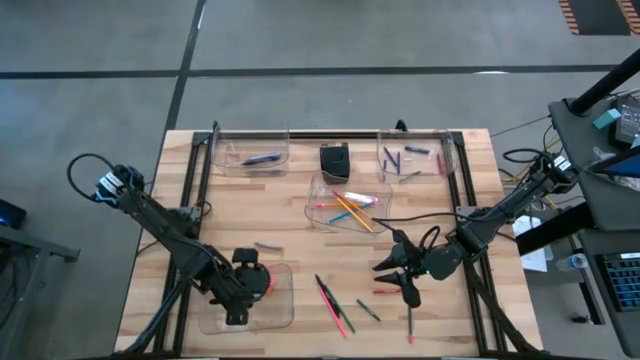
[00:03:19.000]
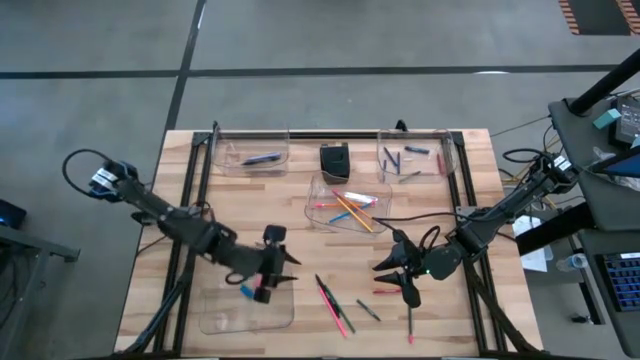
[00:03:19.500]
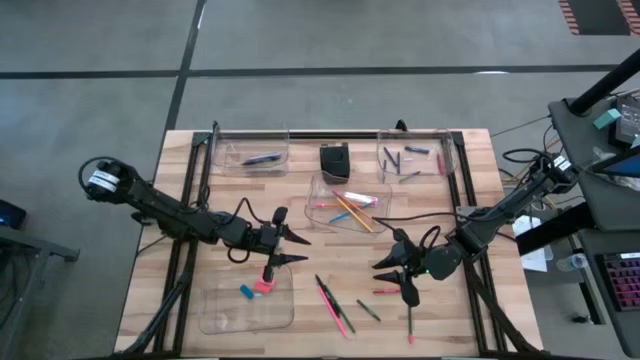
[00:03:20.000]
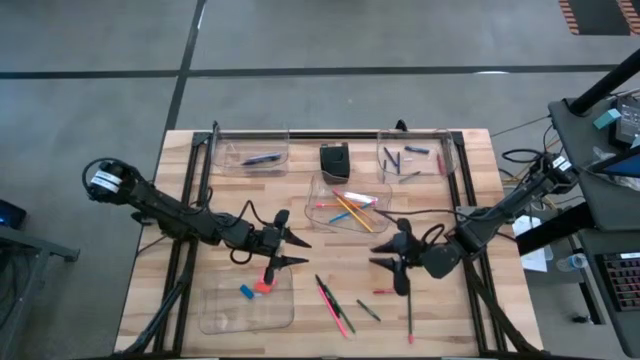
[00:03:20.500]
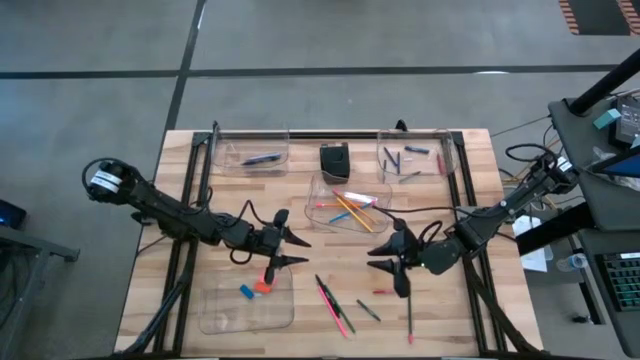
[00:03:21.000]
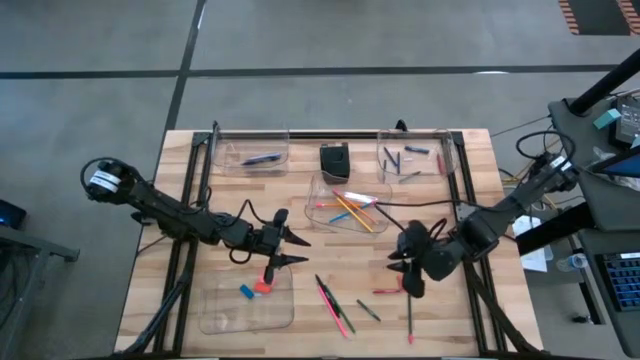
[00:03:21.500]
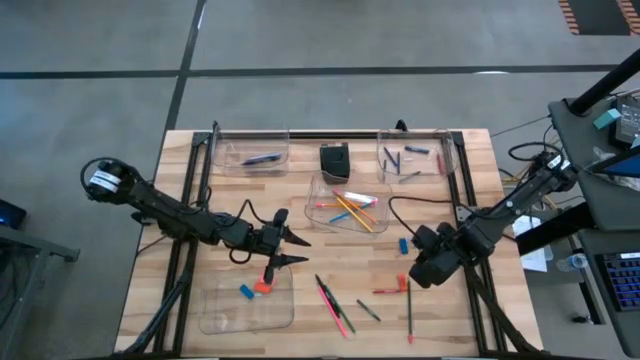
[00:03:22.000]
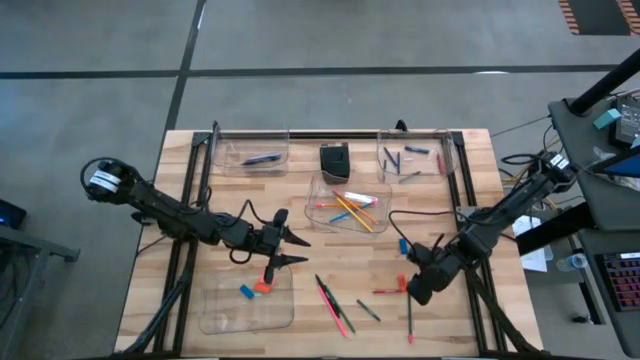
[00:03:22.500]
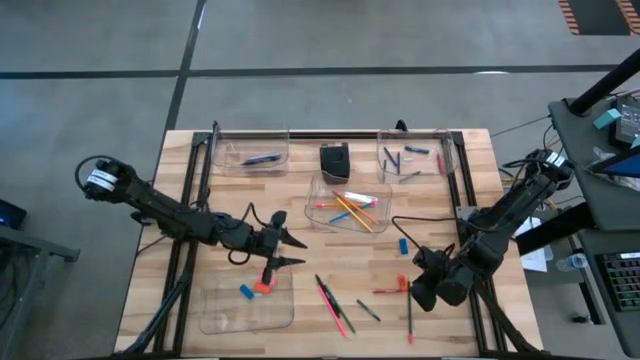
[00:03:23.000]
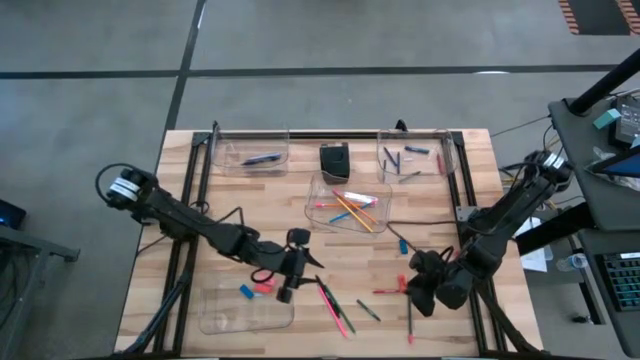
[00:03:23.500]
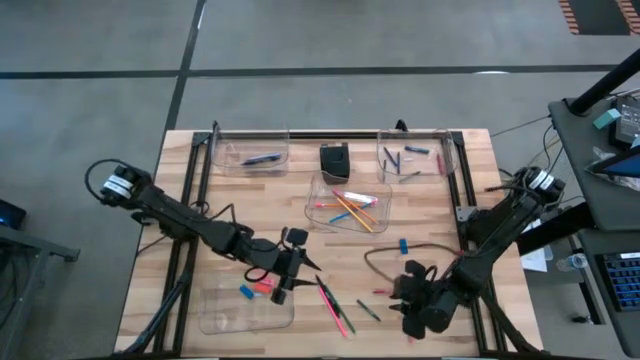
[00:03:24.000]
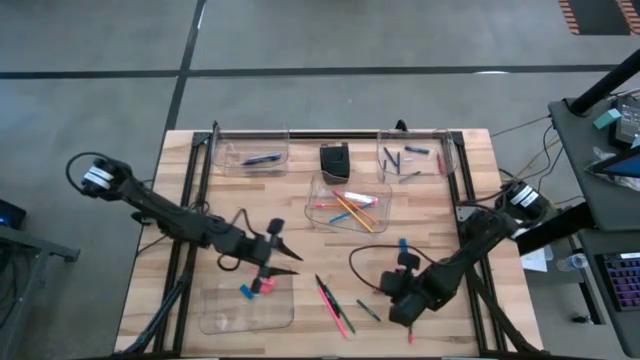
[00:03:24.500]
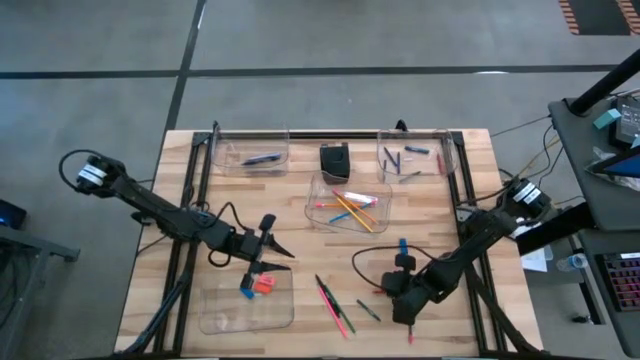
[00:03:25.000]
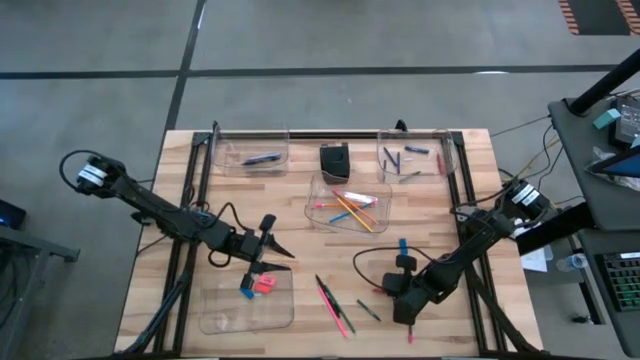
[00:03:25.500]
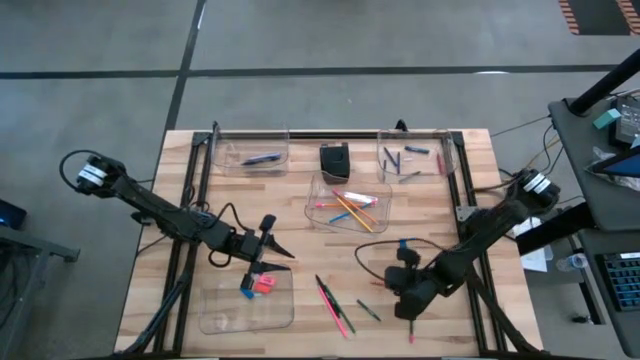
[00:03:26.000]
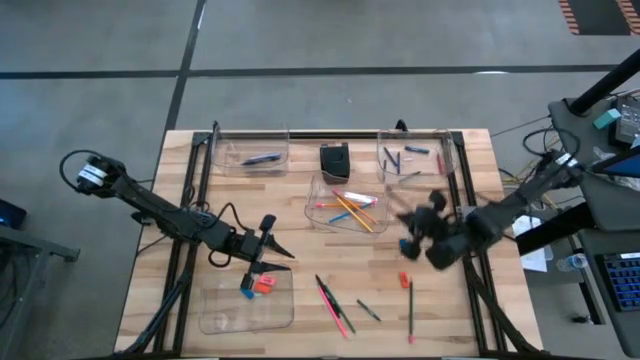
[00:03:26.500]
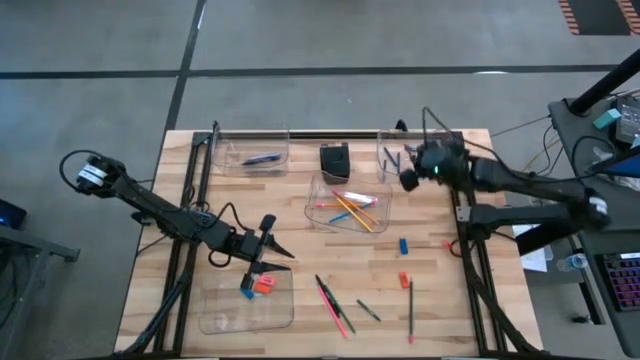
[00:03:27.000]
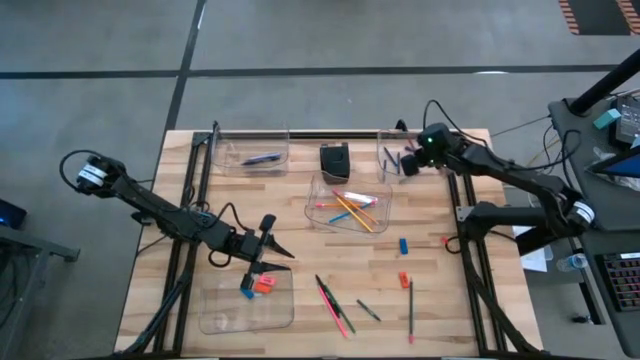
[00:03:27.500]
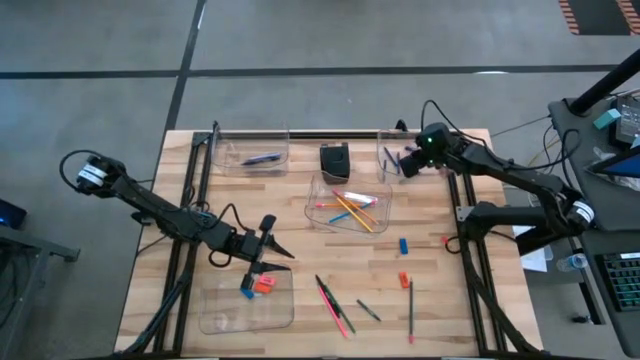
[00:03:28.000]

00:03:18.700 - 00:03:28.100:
Task: Sort crayons/erasers/pens/pencils in bins
Put the red crayon into the top right transparent bin

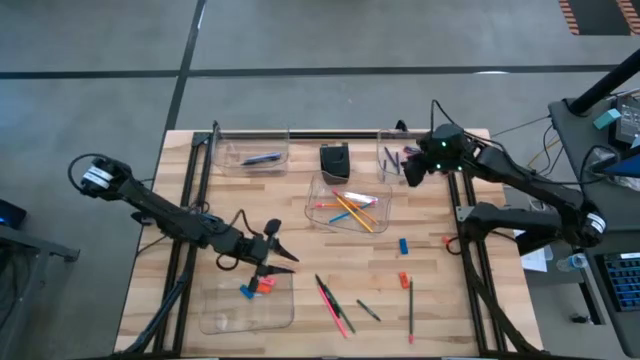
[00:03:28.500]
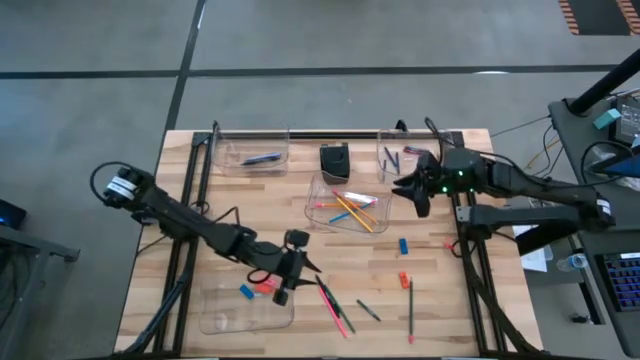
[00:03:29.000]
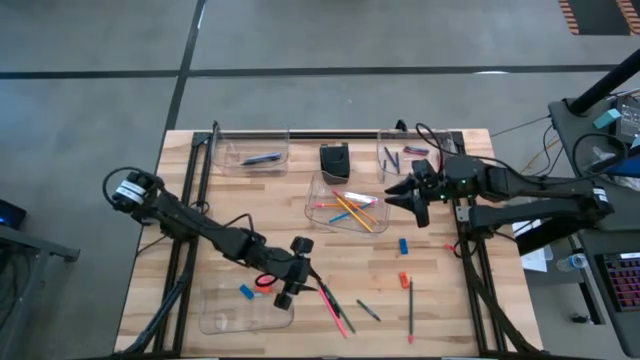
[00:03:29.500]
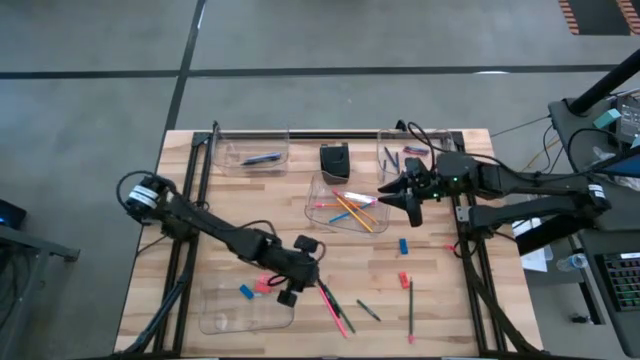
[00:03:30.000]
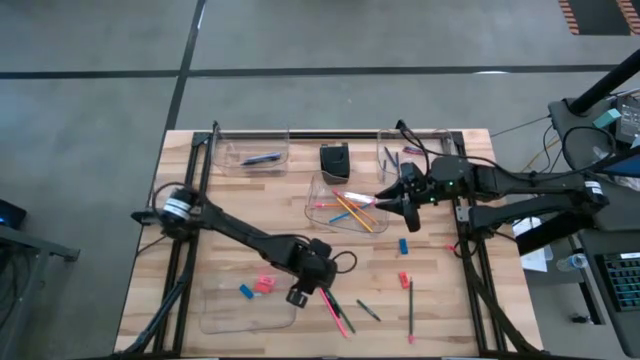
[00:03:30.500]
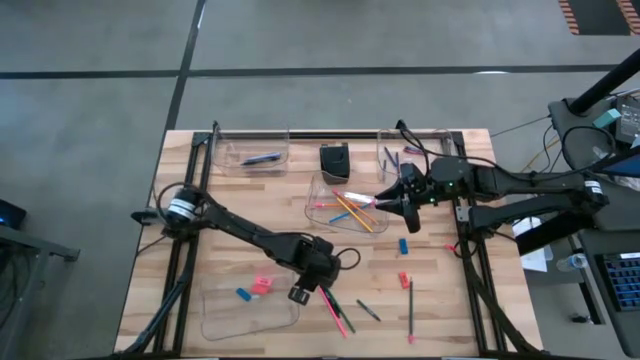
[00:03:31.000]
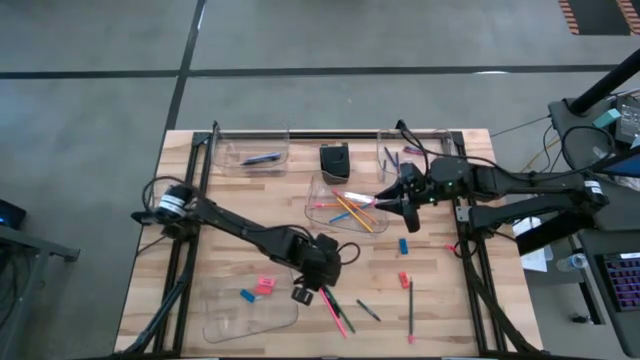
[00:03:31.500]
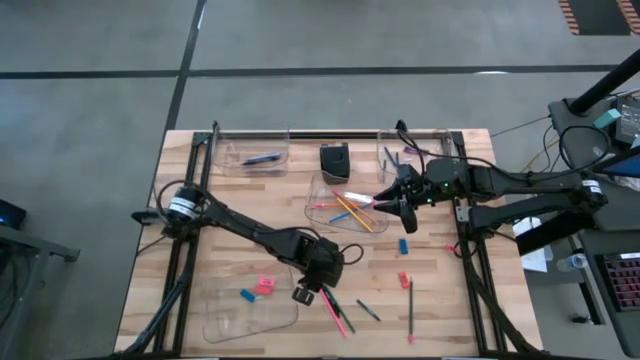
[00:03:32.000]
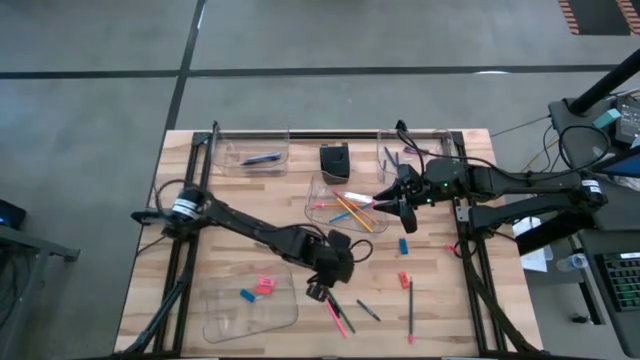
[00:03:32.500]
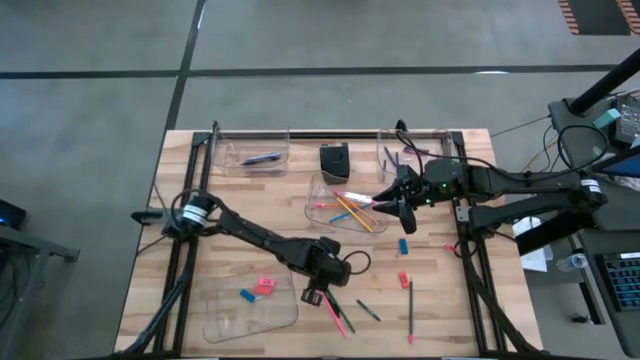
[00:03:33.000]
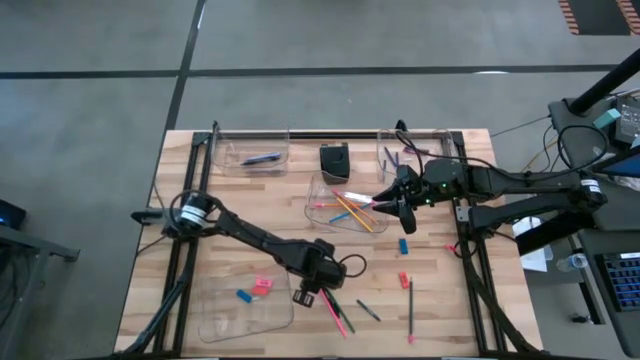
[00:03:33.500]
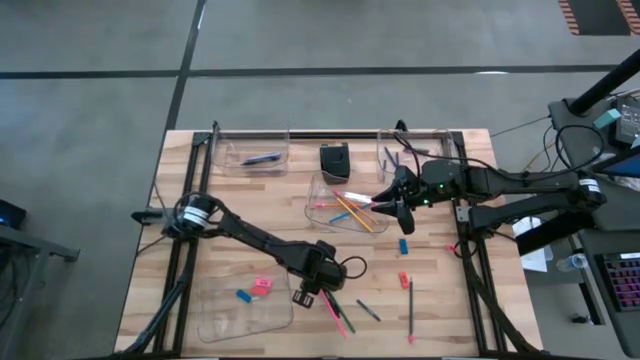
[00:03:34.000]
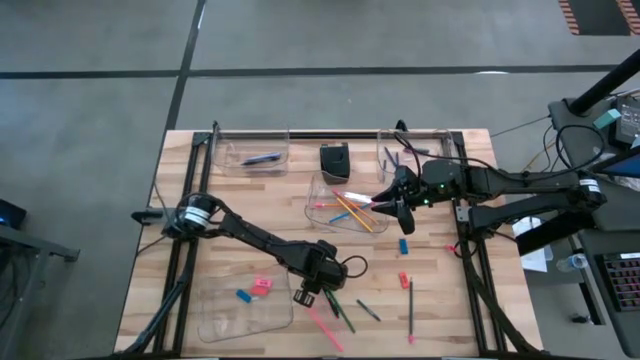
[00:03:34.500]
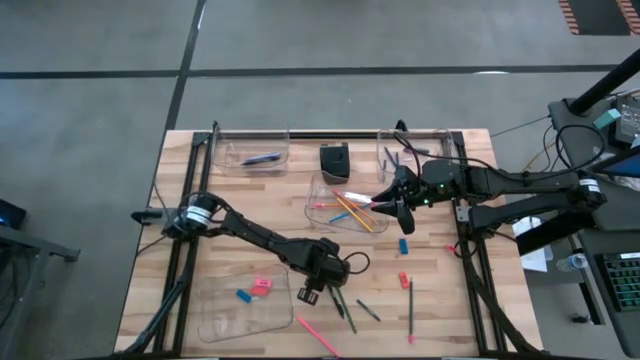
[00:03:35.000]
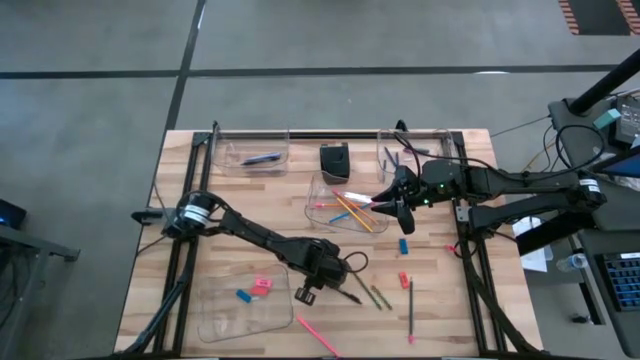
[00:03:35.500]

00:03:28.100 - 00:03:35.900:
Put the black pen into the top left transparent bin

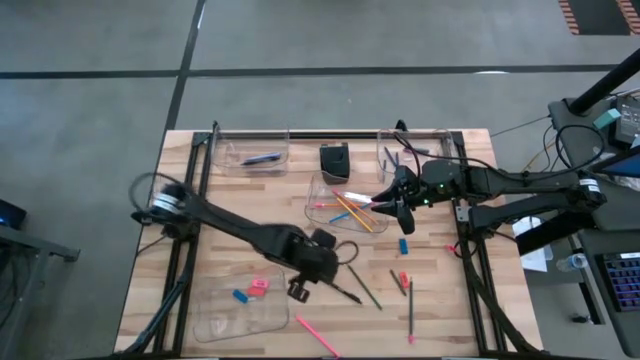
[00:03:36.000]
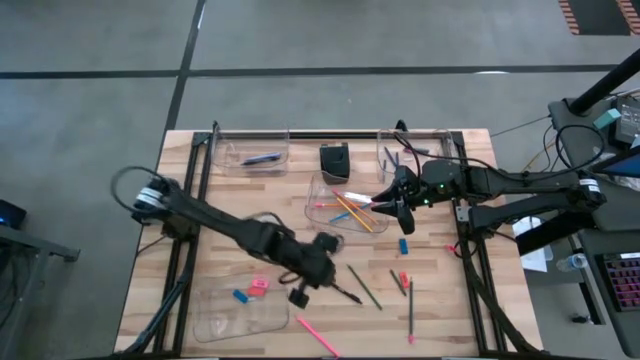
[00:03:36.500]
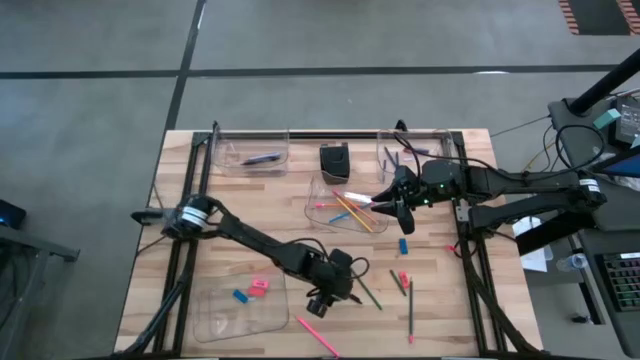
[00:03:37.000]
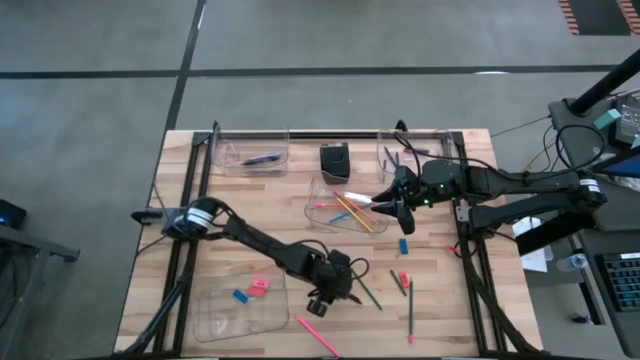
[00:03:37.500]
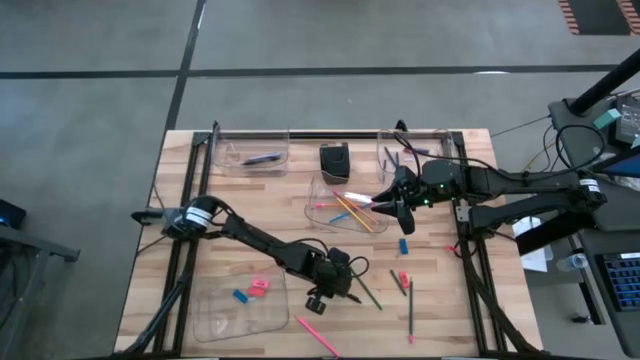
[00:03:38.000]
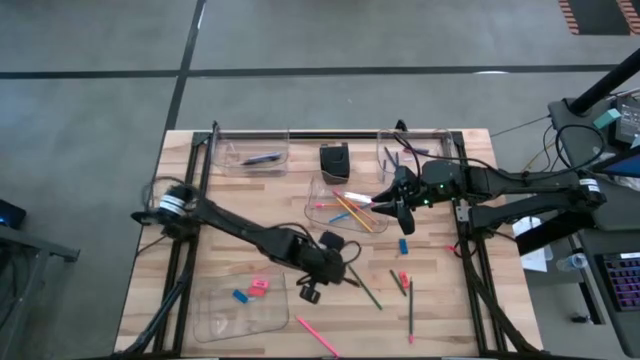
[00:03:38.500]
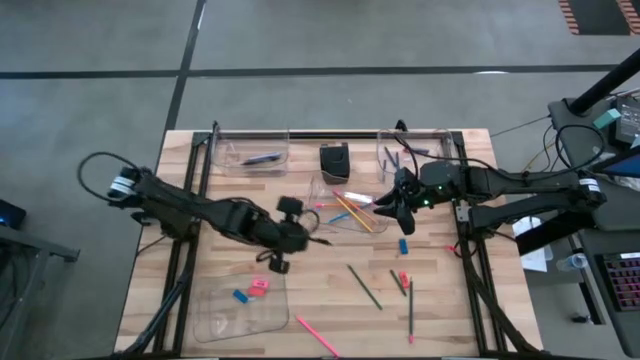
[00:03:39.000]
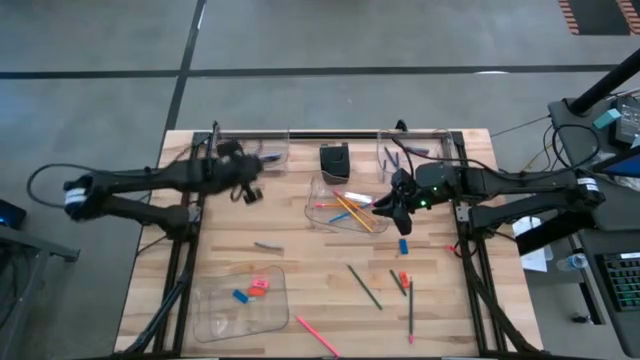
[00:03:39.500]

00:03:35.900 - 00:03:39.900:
Put the black pen into the top left transparent bin

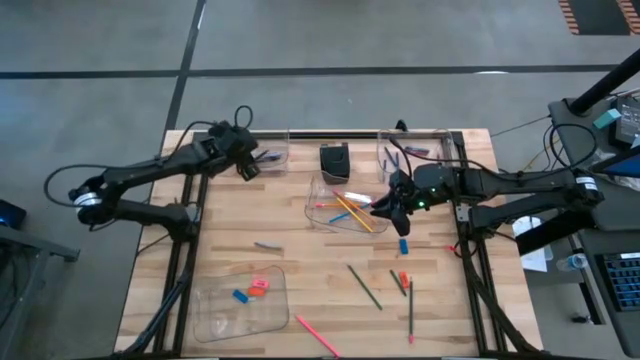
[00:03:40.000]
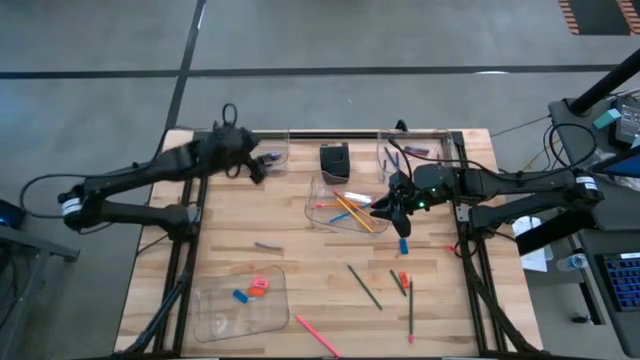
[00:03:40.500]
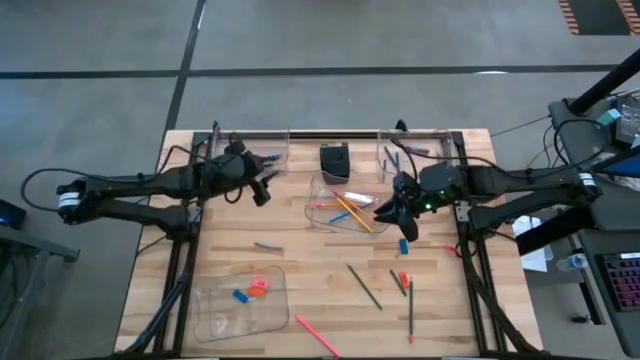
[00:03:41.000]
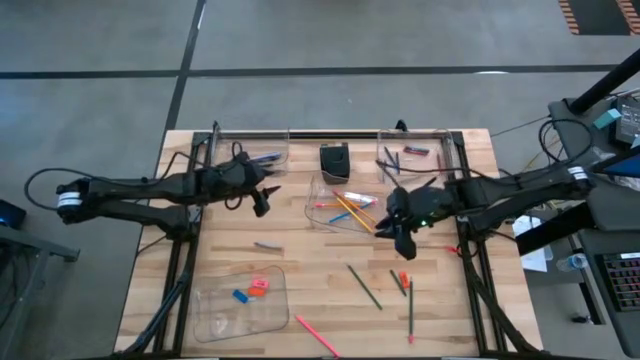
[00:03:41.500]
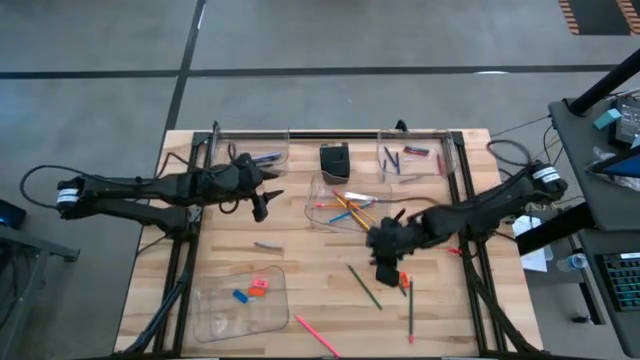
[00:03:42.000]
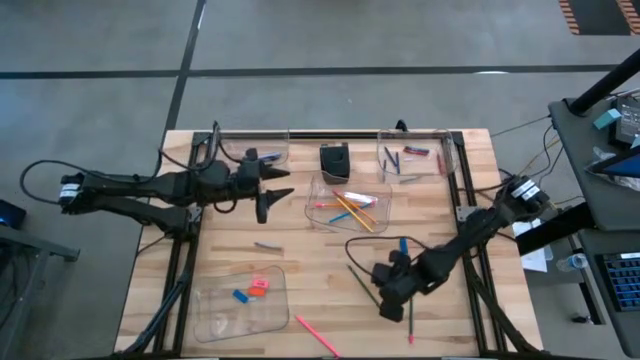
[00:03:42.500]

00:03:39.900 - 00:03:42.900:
Put the green pencil into the middle transparent bin
